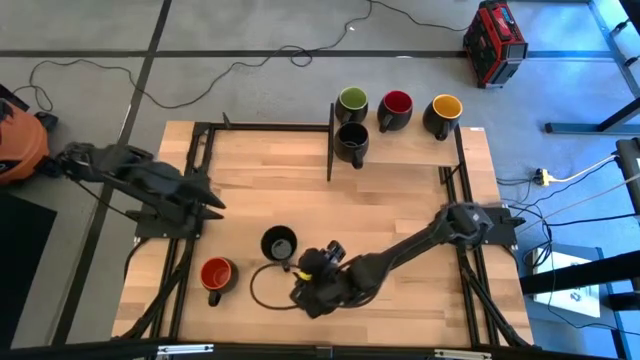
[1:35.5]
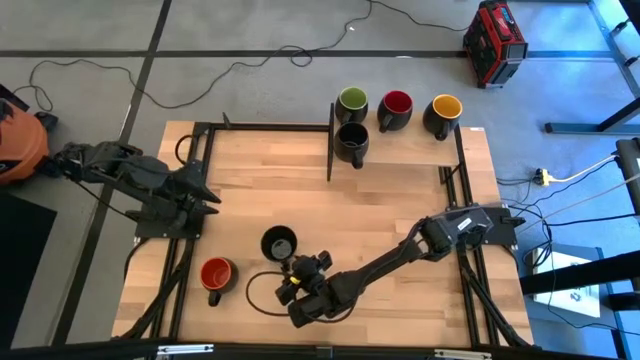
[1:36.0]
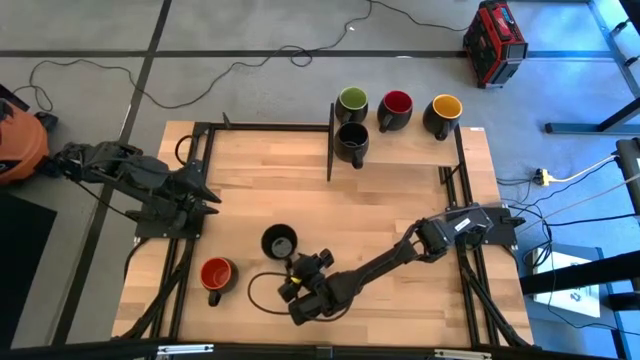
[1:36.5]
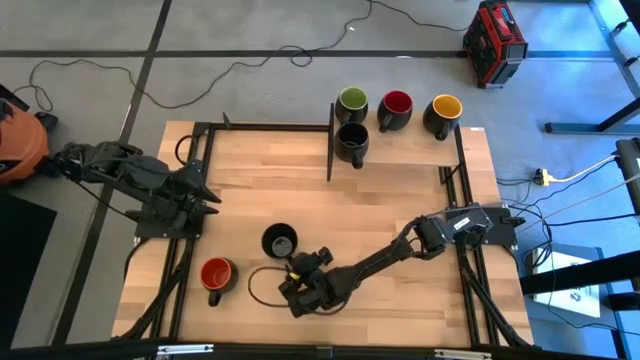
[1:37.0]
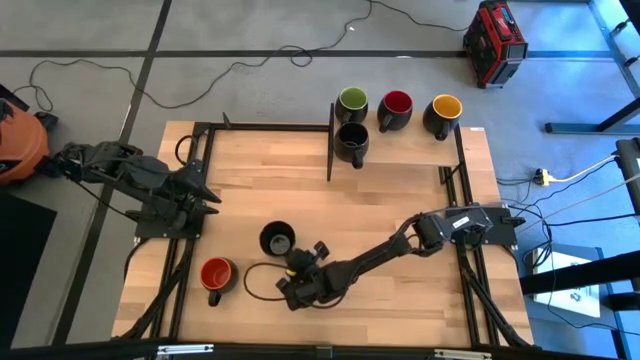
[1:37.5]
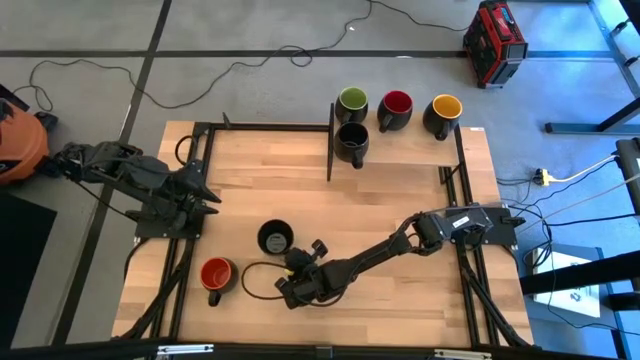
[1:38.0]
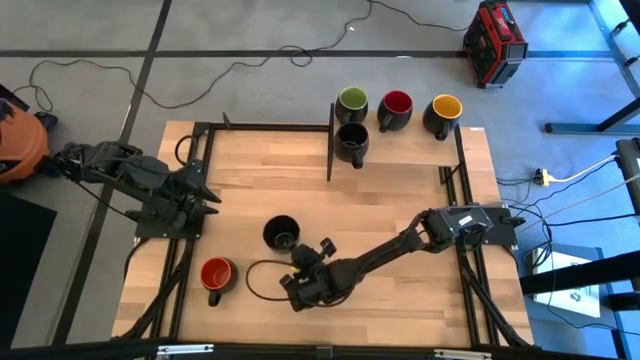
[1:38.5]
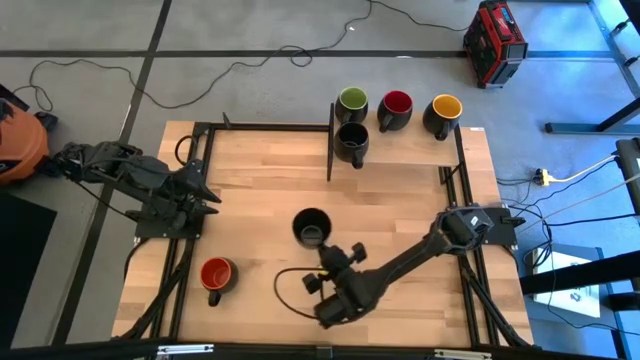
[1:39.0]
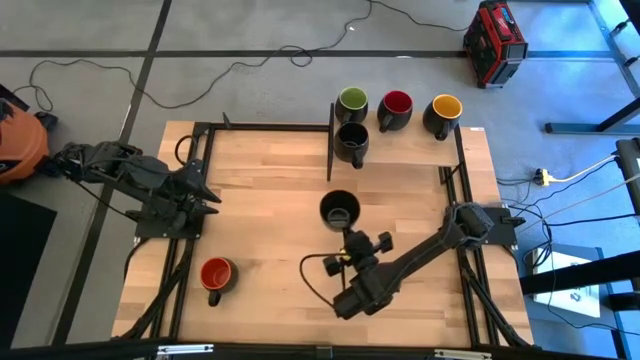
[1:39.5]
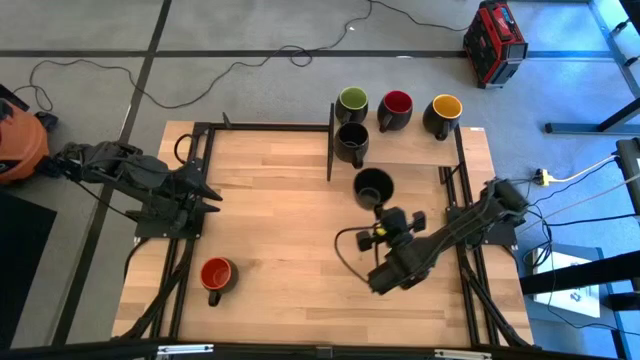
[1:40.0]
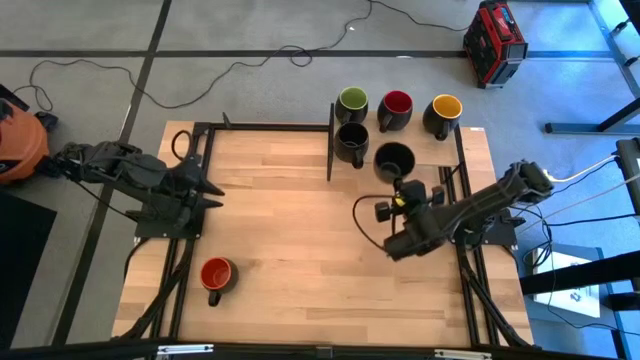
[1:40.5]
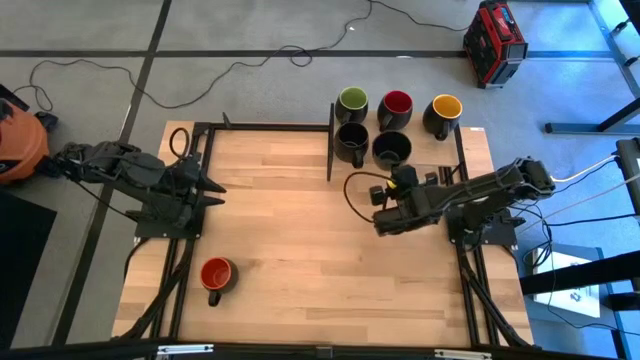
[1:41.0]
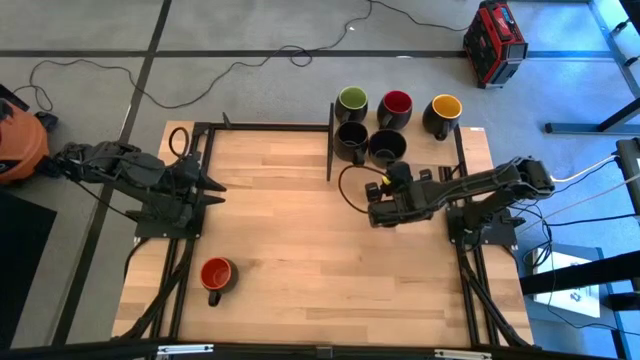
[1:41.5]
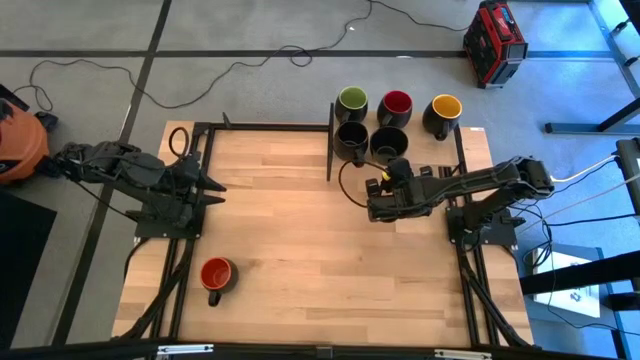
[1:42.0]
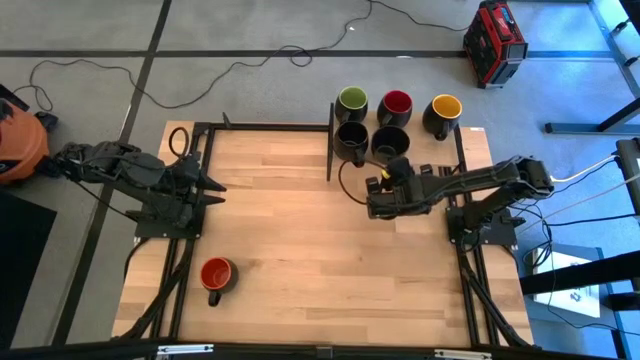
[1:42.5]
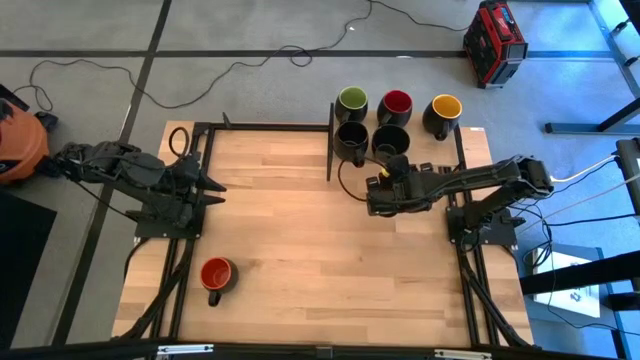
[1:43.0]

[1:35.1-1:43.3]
Task: Place coffee mugs
Put the black mug on the shelf

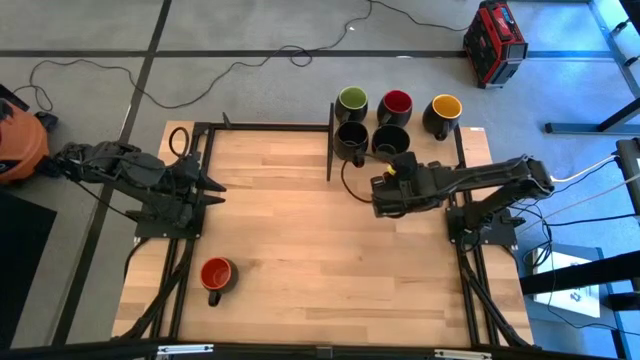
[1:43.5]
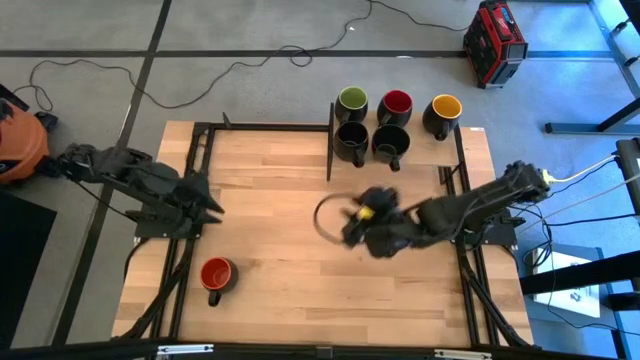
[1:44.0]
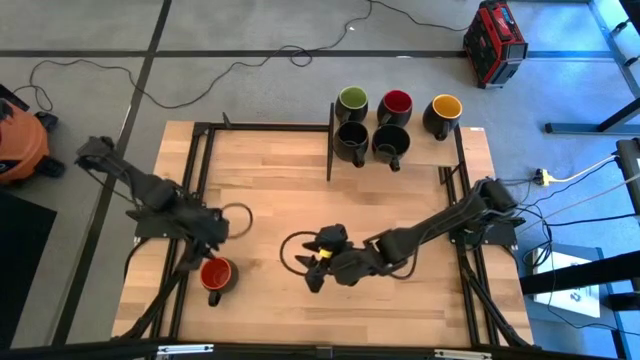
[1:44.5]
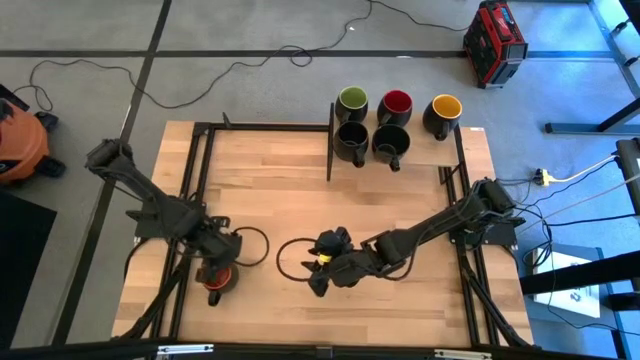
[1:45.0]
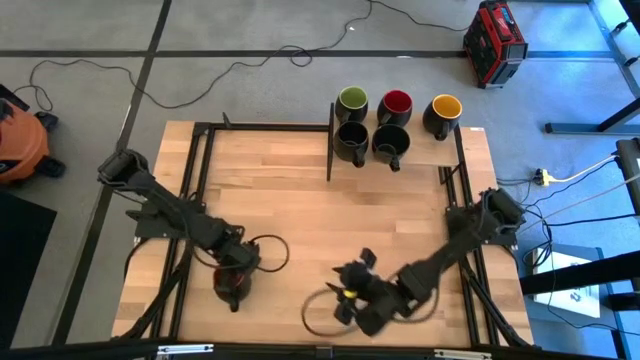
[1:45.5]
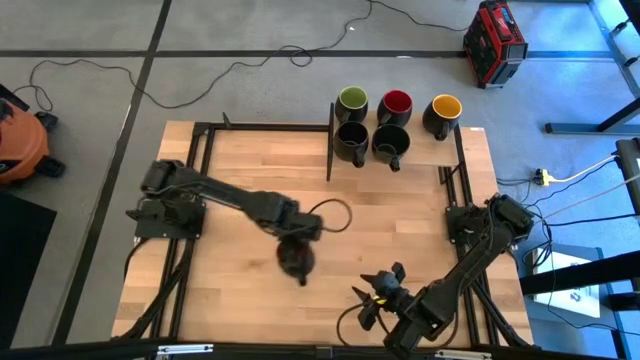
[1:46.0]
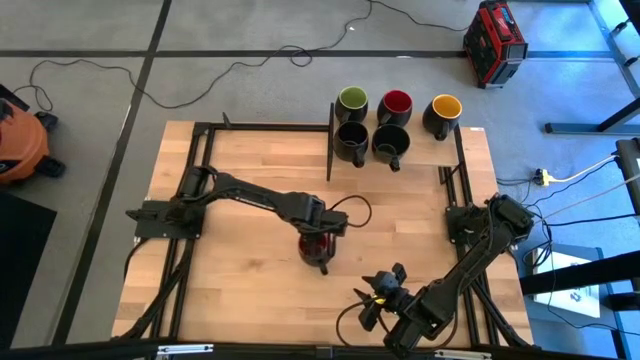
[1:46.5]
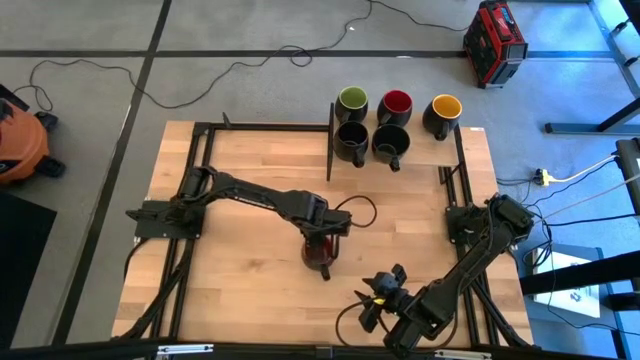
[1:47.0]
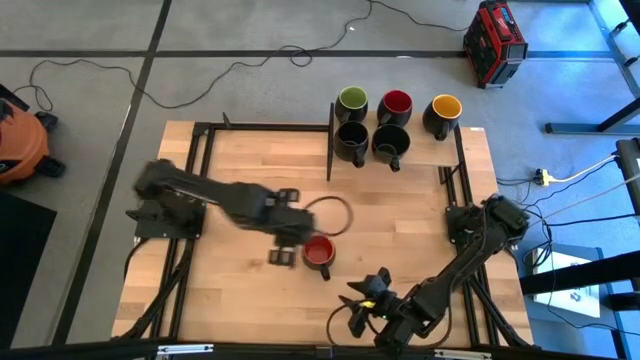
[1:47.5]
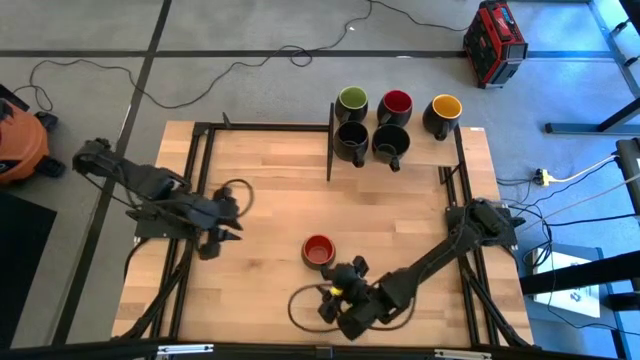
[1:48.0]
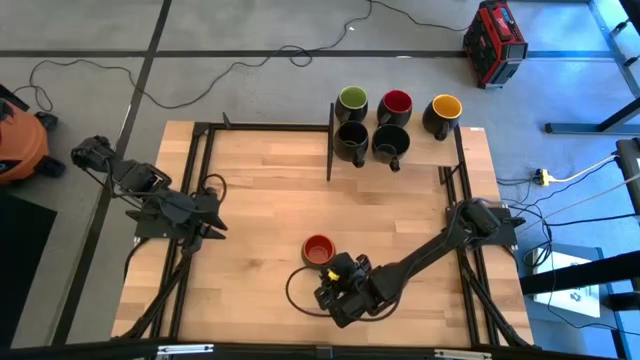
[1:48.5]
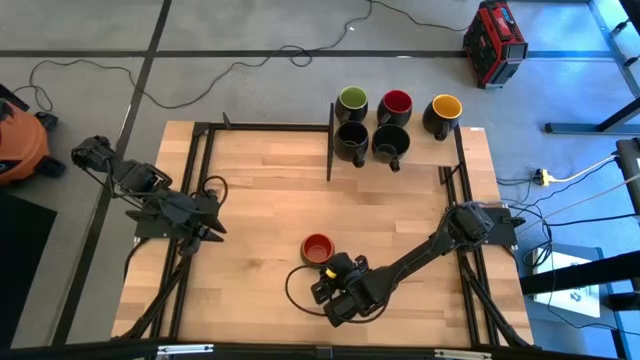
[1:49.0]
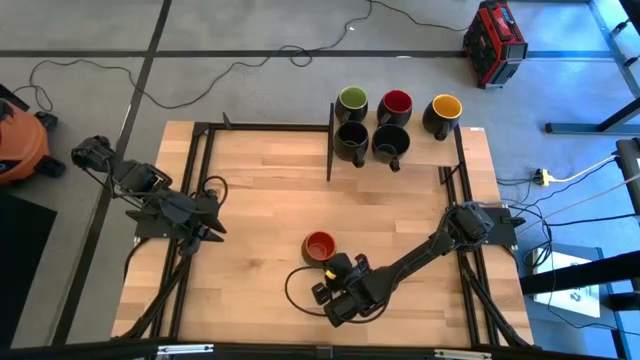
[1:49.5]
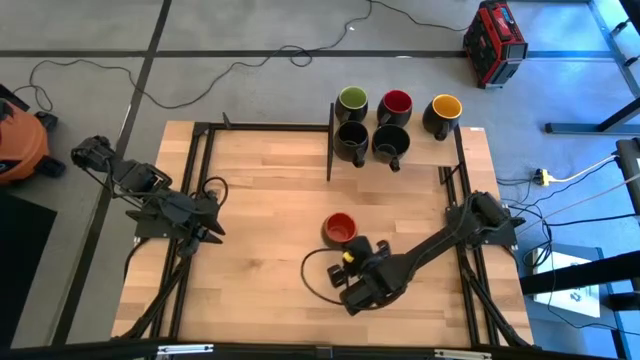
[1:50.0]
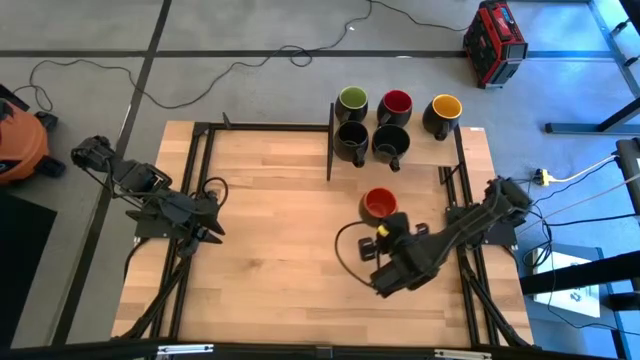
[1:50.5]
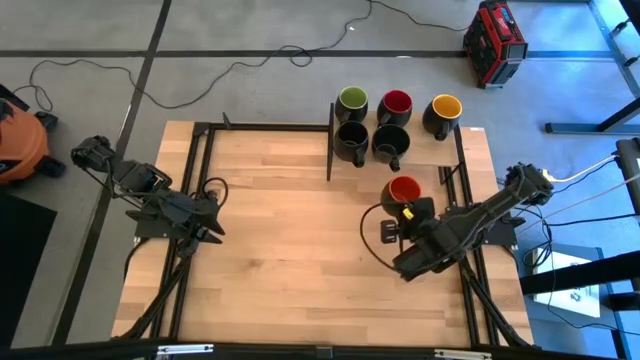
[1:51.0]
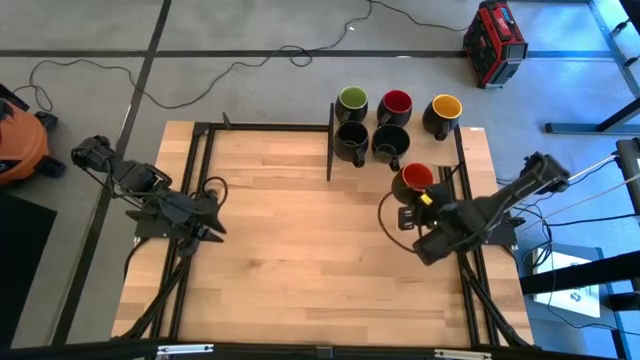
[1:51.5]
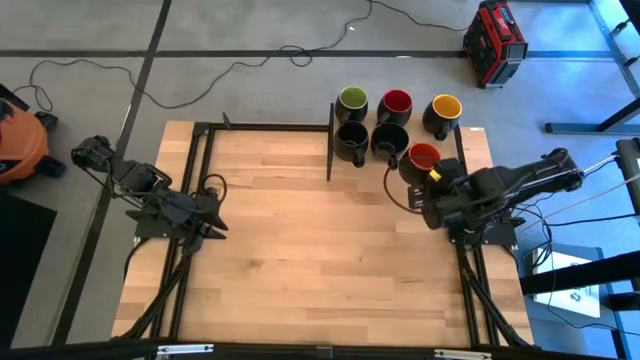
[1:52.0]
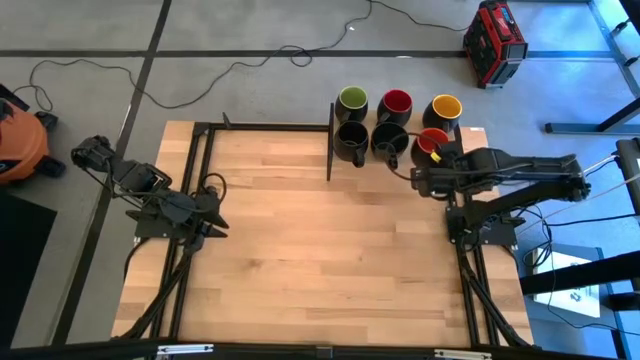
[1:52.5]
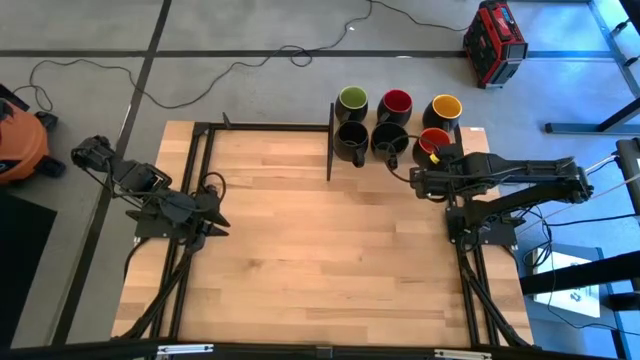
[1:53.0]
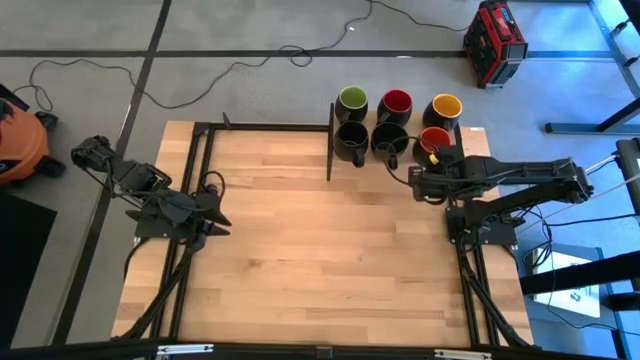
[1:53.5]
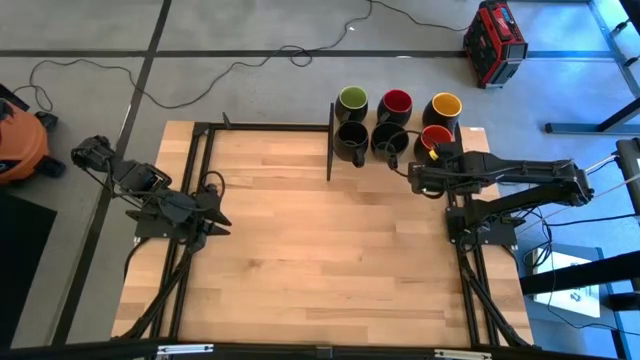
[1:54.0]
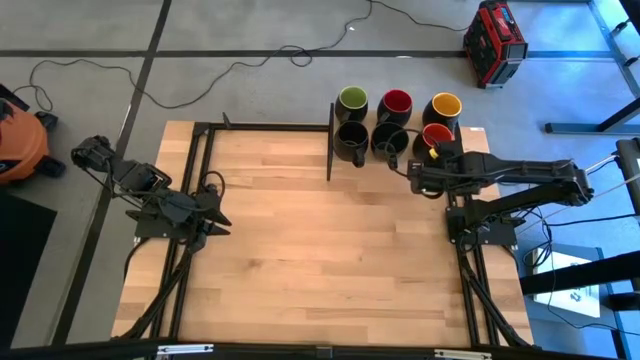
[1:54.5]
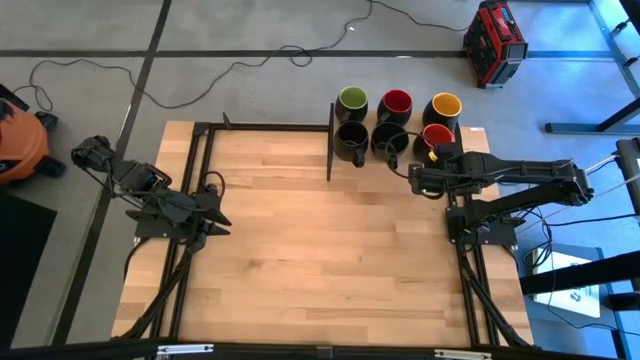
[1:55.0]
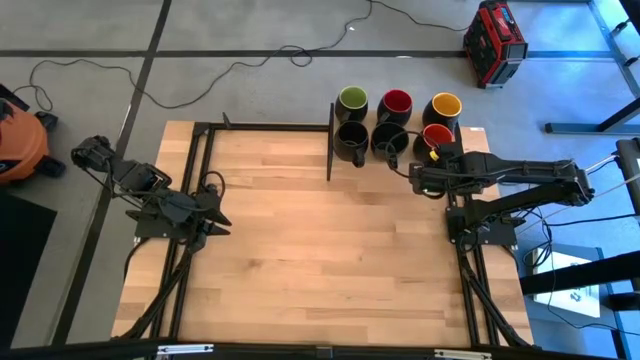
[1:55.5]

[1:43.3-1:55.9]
Put the orange mug on the shelf
